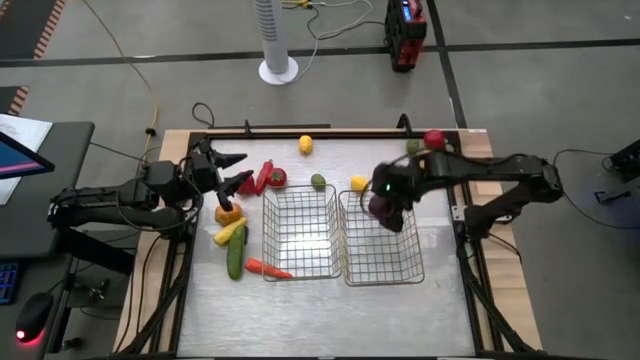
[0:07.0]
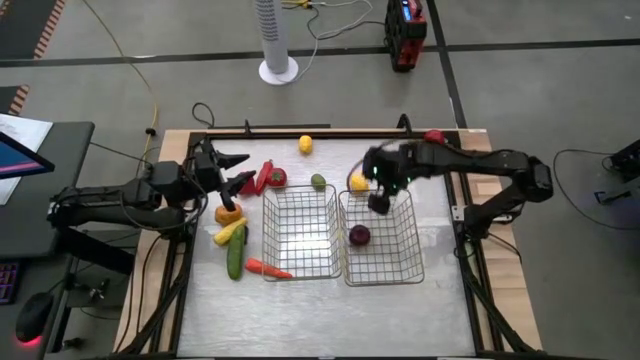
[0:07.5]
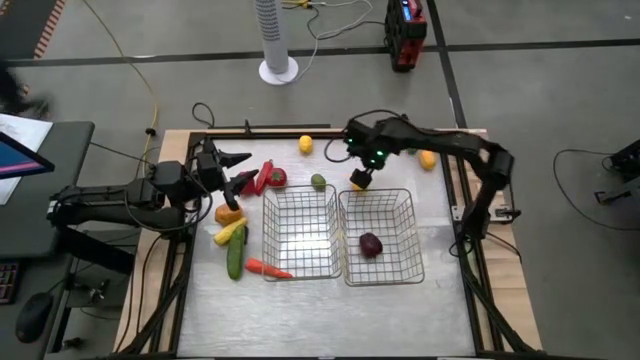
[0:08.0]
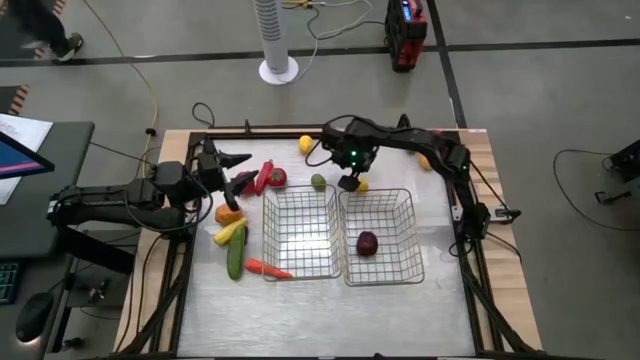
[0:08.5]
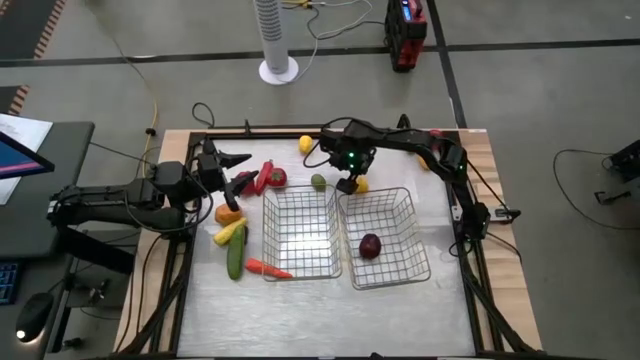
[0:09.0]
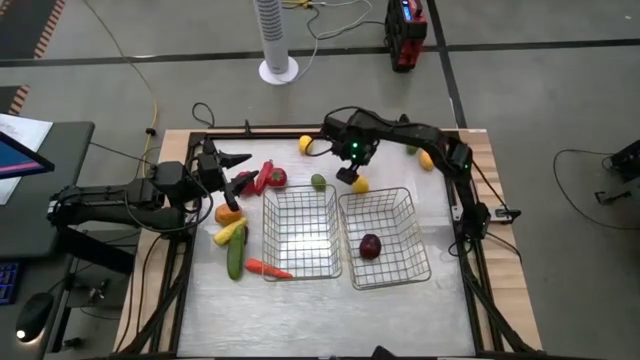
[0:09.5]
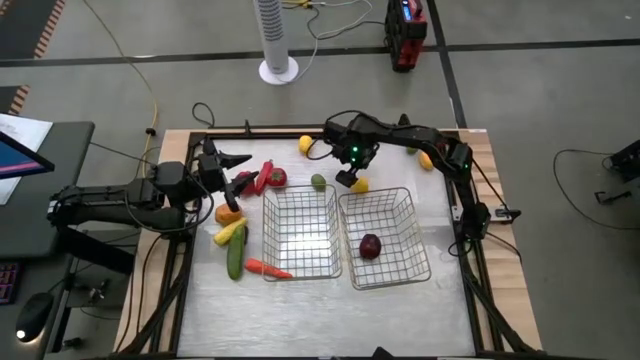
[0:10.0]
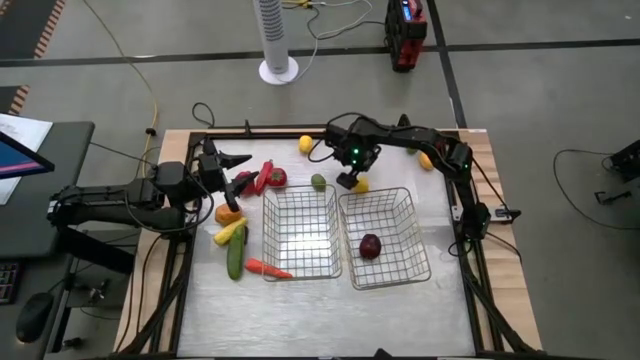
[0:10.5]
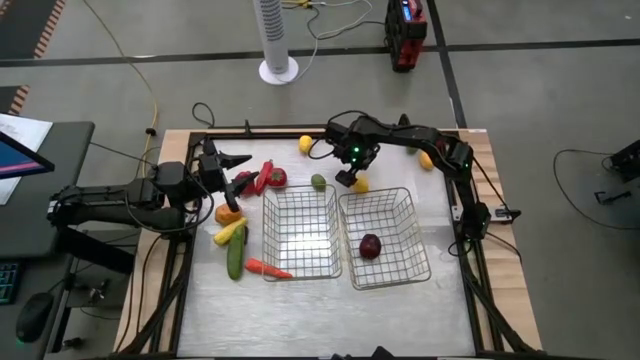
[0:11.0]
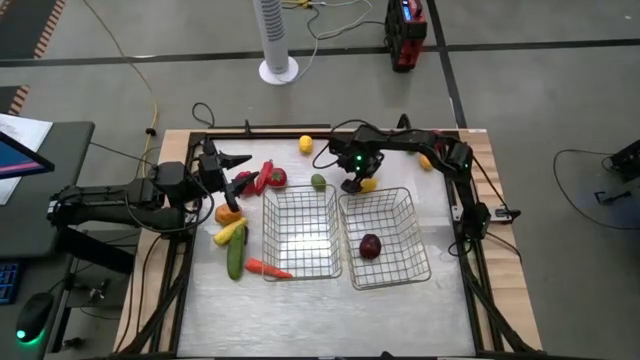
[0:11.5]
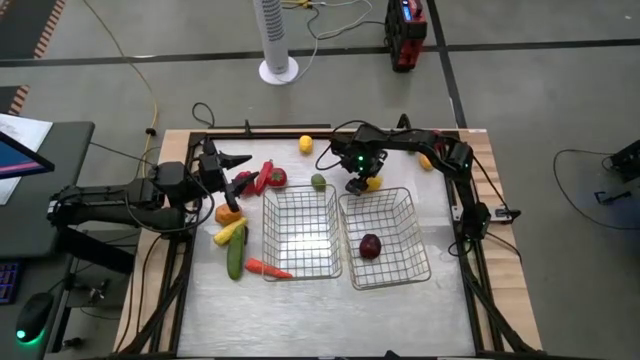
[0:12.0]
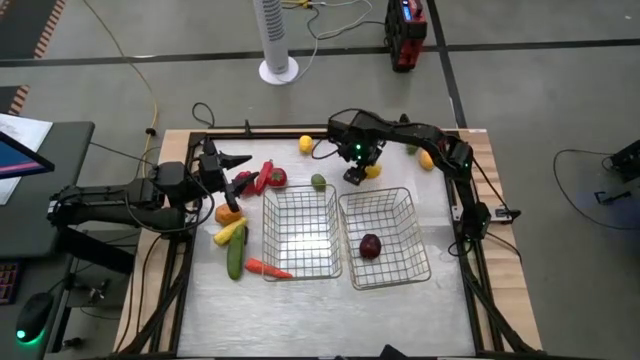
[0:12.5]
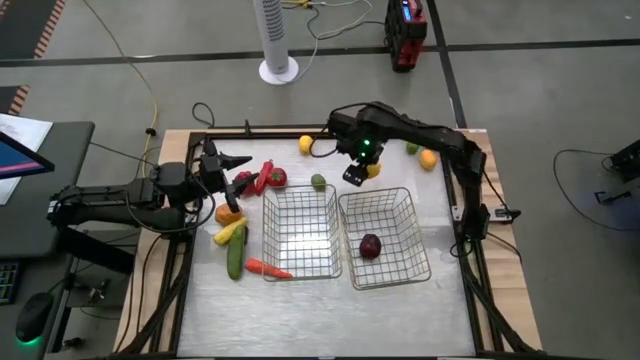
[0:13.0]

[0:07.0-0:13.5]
Task: Sort produce into baskets
Put the bottom left lemon into the right wire basket

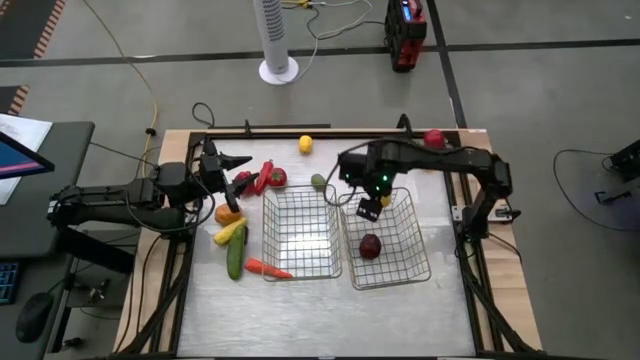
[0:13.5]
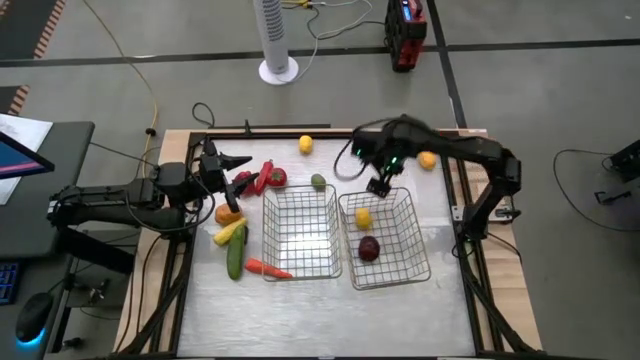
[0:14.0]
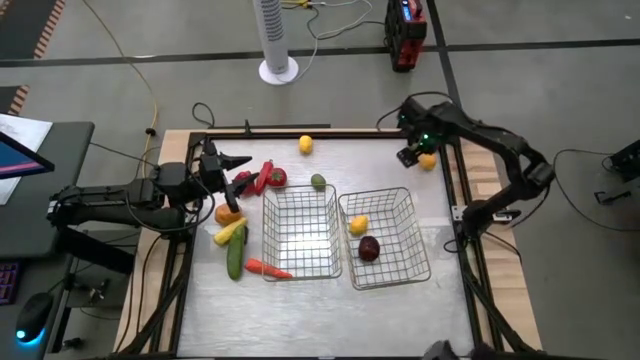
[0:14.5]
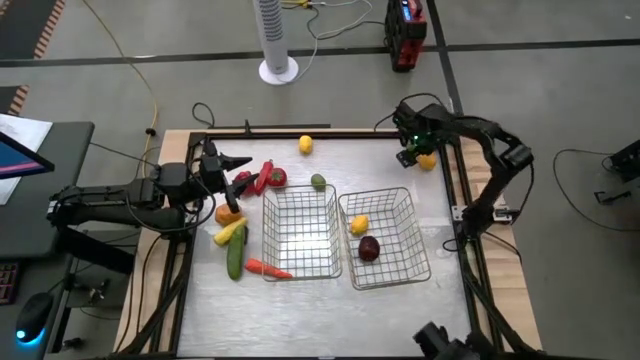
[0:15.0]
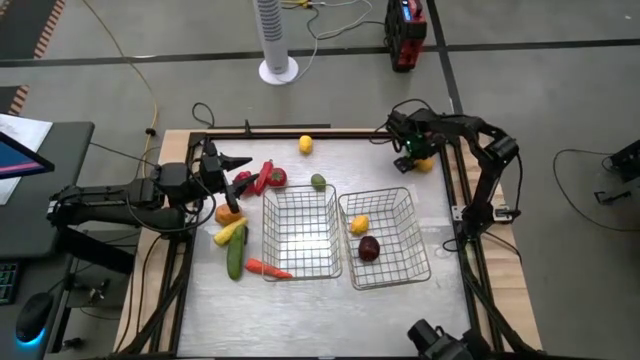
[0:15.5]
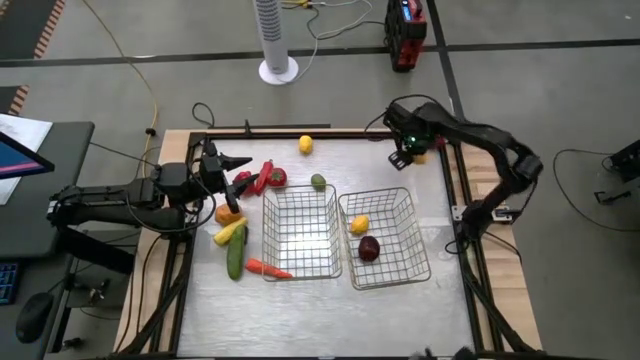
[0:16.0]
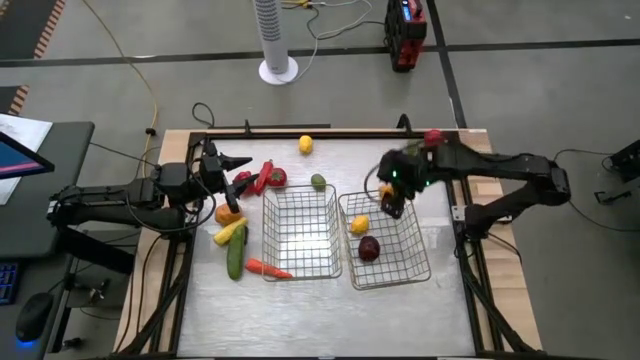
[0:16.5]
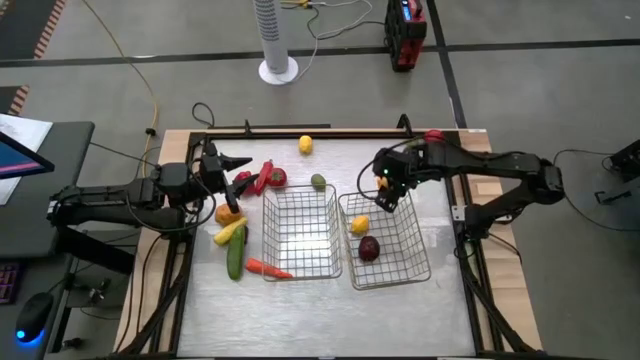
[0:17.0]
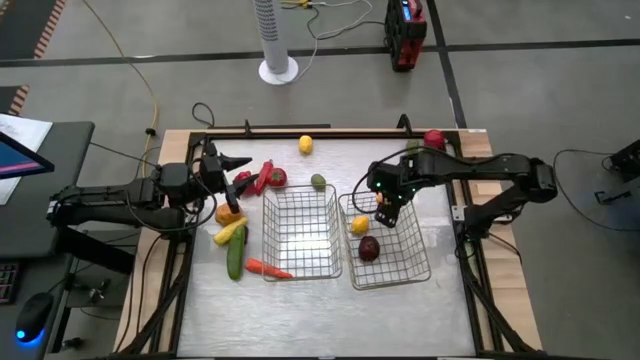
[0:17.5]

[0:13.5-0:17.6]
Put the bottom lemon into the right wire basket

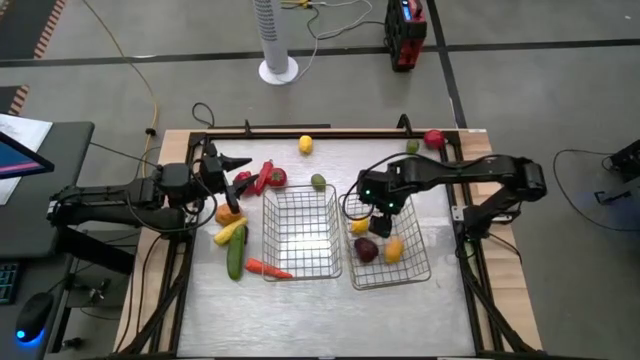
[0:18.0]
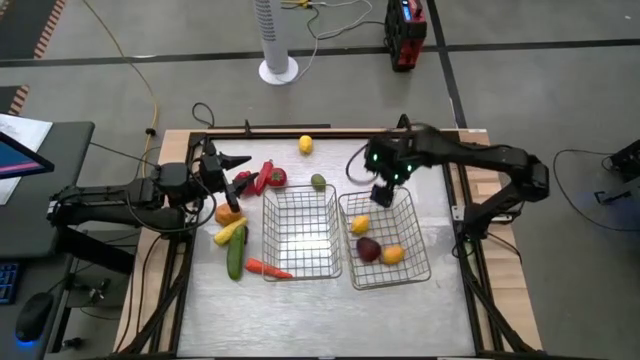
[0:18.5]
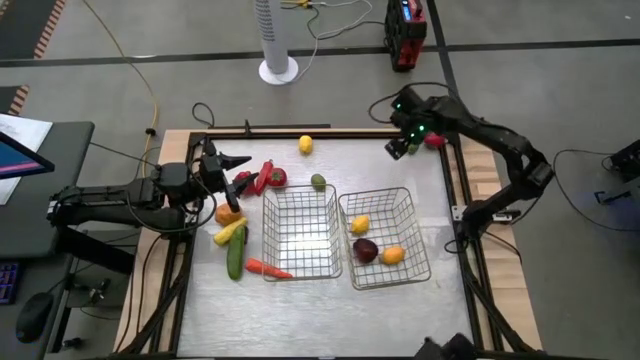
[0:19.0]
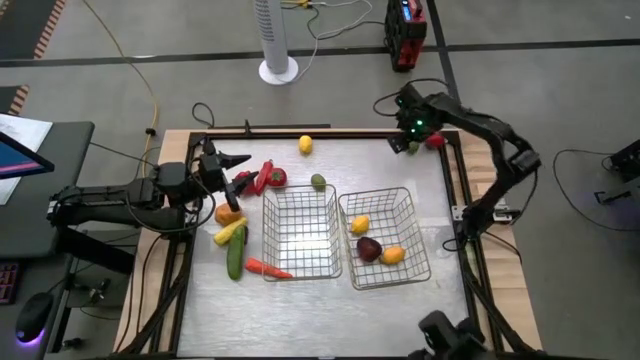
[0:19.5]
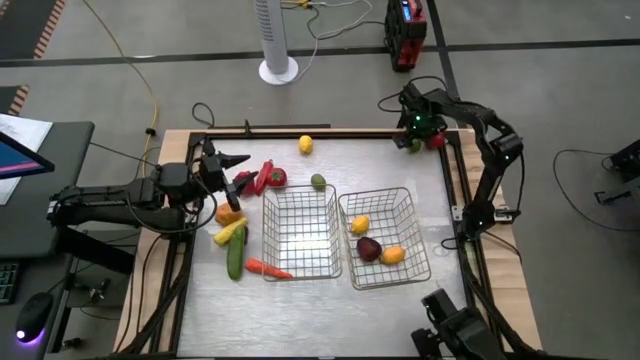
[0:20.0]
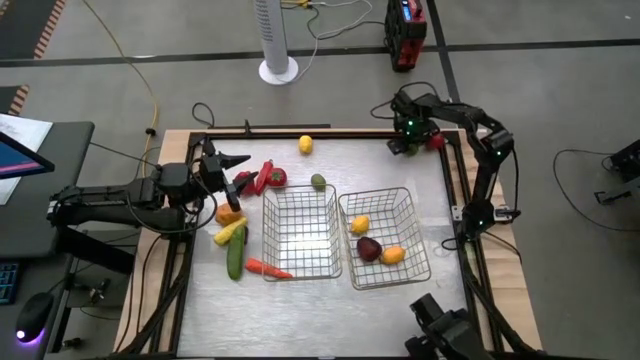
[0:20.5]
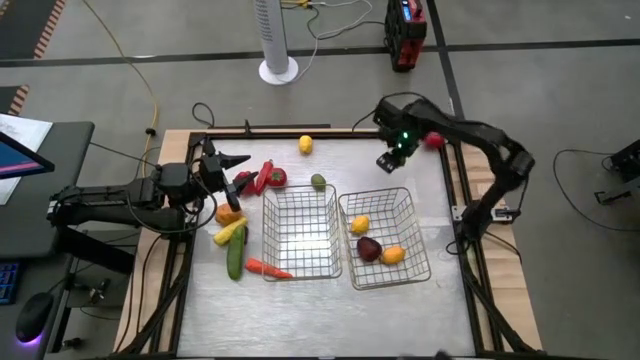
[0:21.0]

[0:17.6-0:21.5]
Put the top lime into the right wire basket

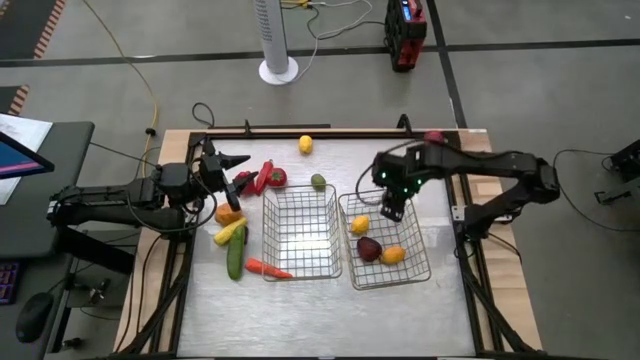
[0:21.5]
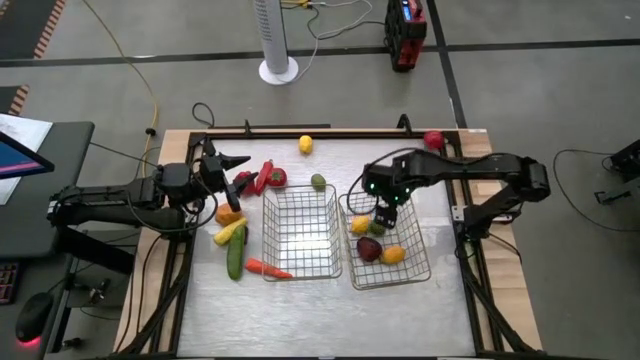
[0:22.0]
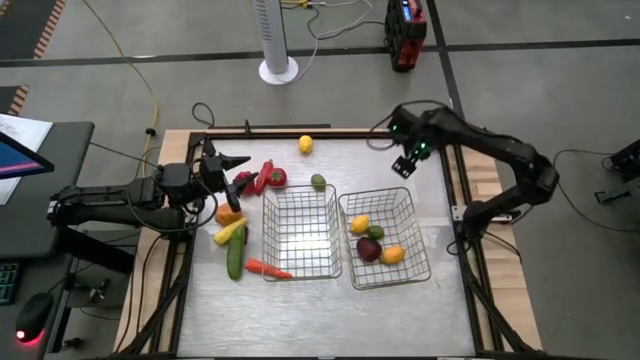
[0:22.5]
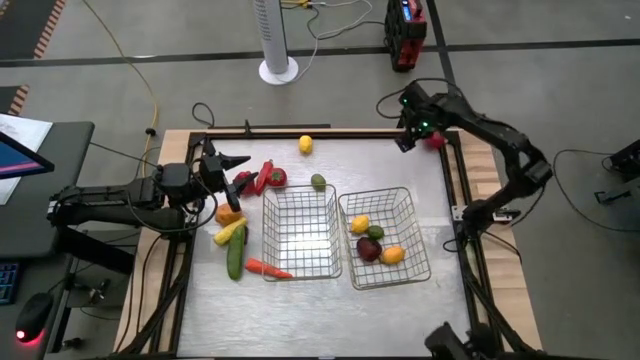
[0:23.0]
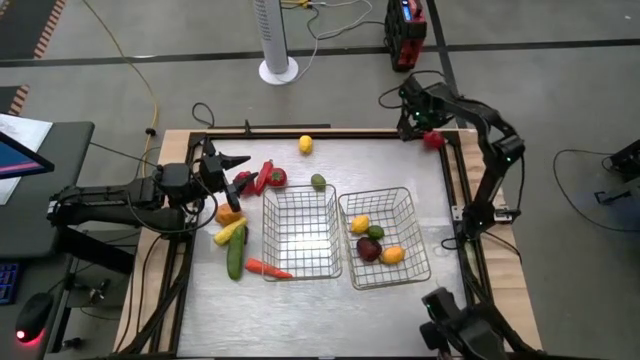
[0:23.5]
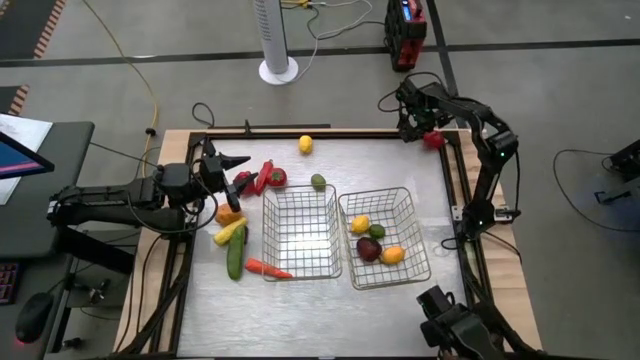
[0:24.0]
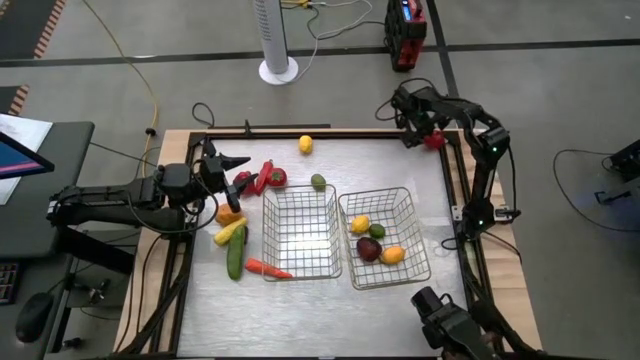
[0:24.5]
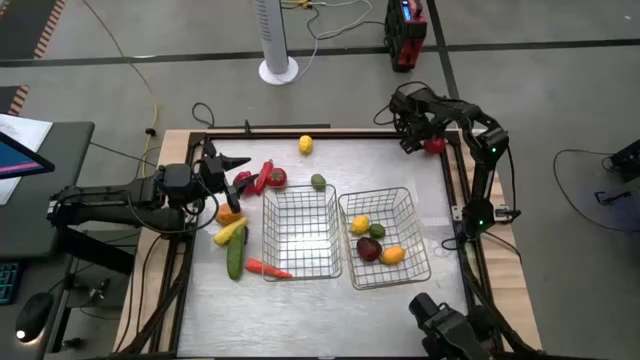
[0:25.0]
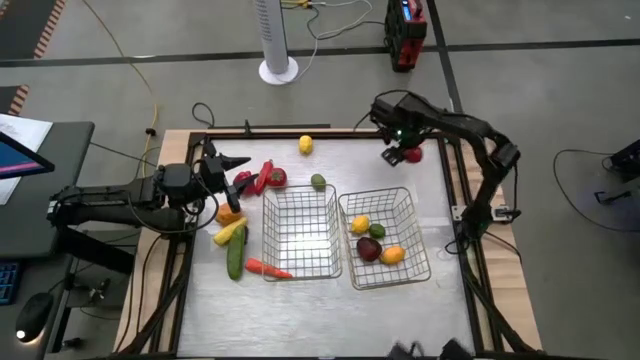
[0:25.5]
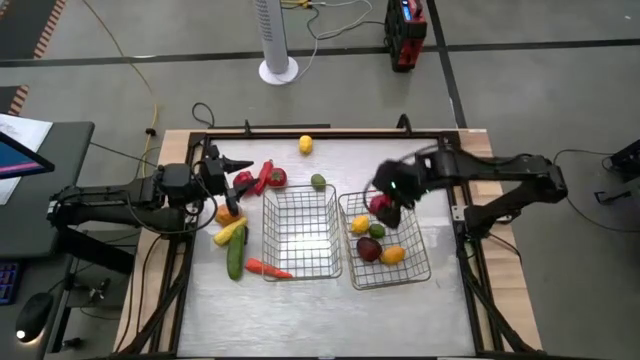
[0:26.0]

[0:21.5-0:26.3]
Put the top tomato into the right wire basket

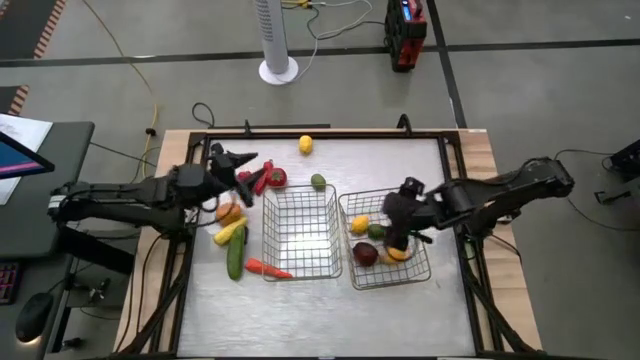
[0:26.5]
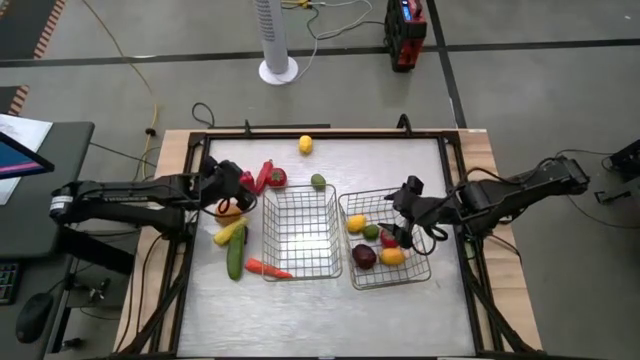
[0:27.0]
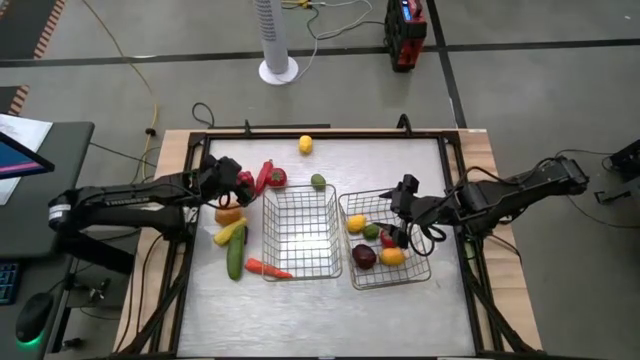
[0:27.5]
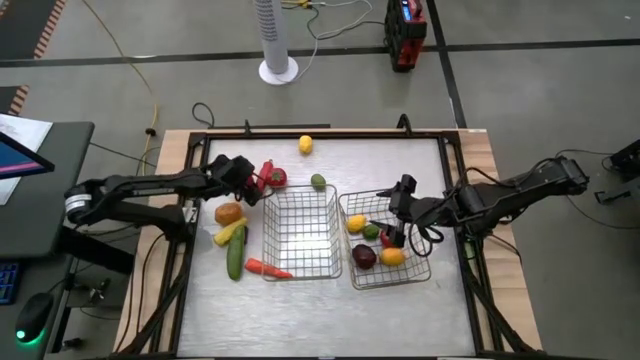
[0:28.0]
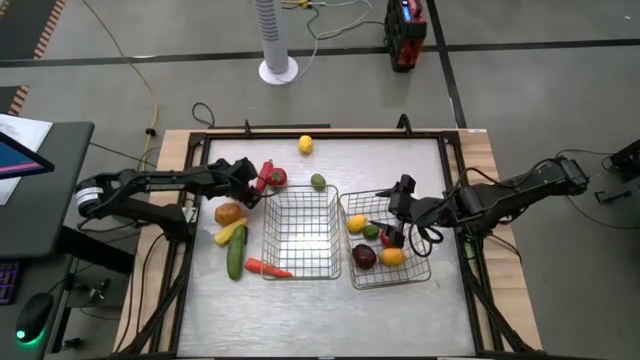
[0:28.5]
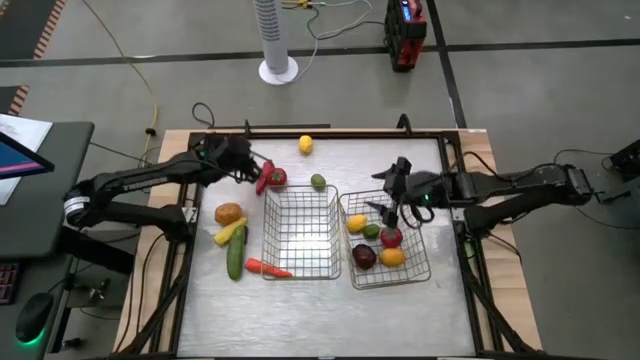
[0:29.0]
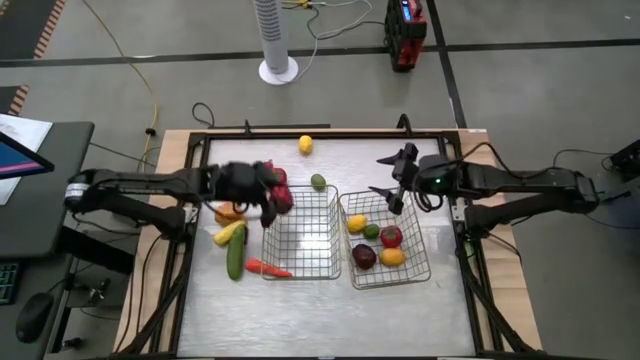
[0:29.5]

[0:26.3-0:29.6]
Put the red bell pepper into the left wire basket
